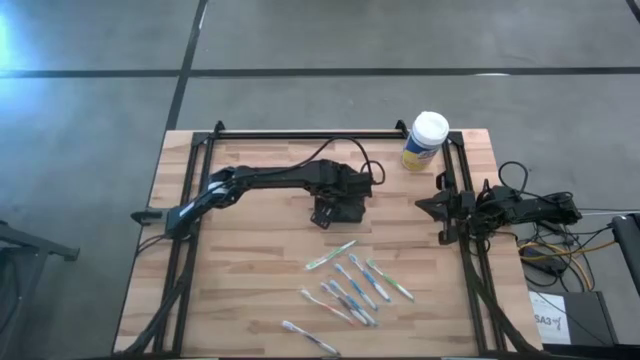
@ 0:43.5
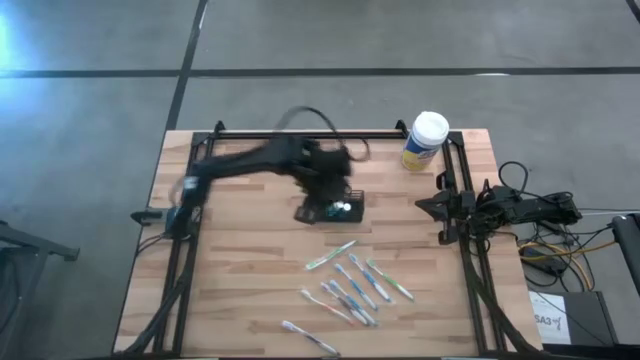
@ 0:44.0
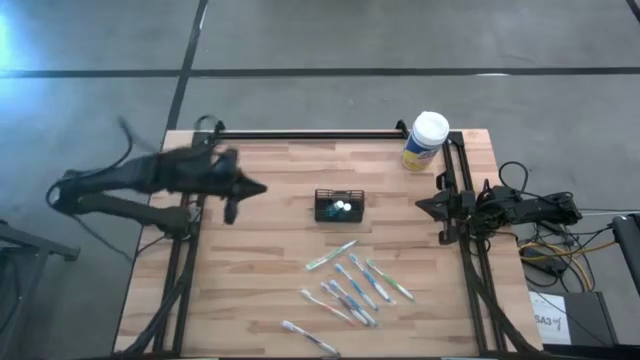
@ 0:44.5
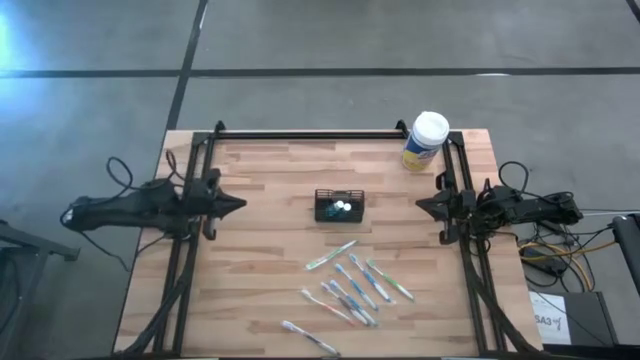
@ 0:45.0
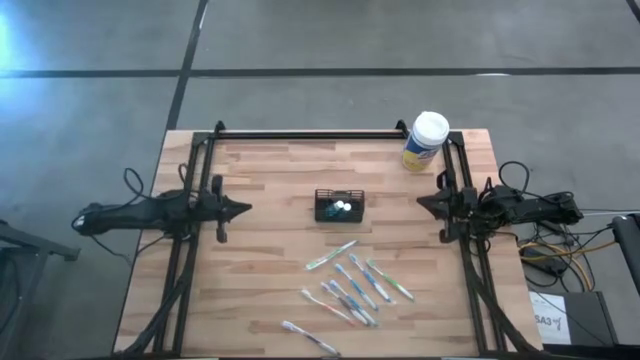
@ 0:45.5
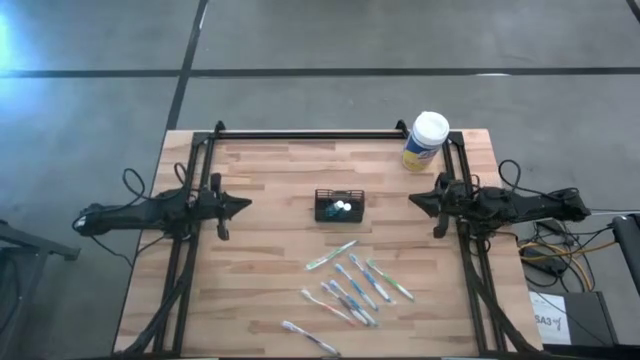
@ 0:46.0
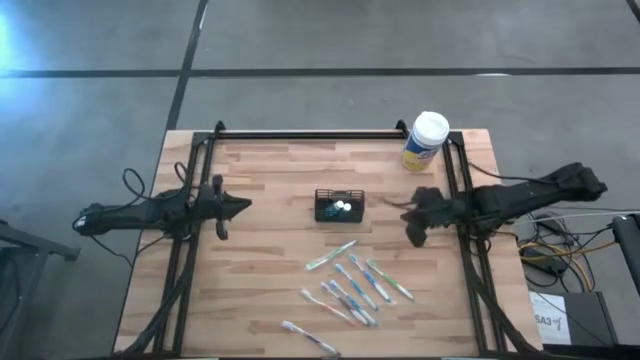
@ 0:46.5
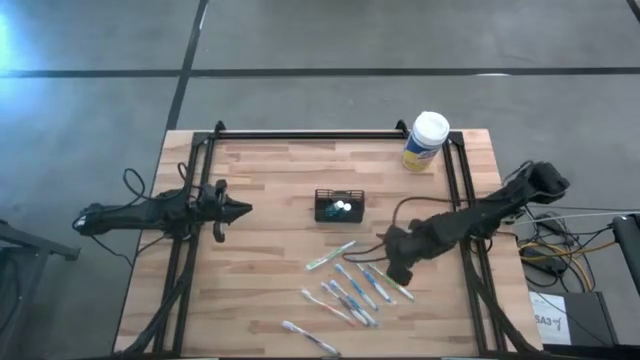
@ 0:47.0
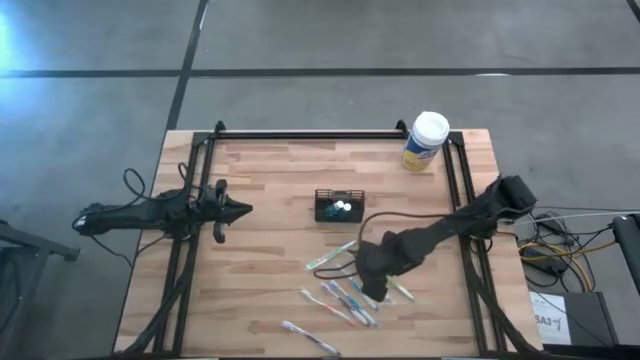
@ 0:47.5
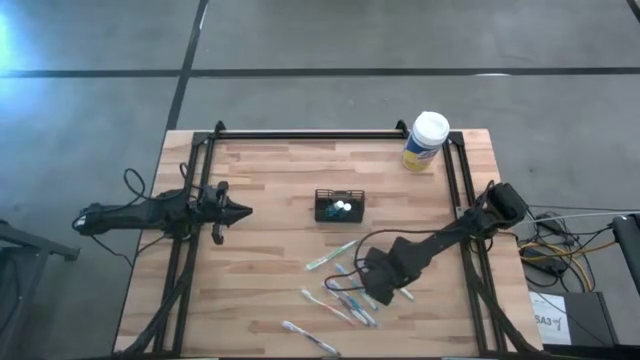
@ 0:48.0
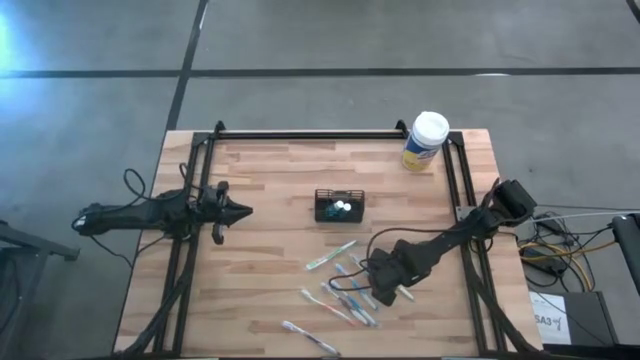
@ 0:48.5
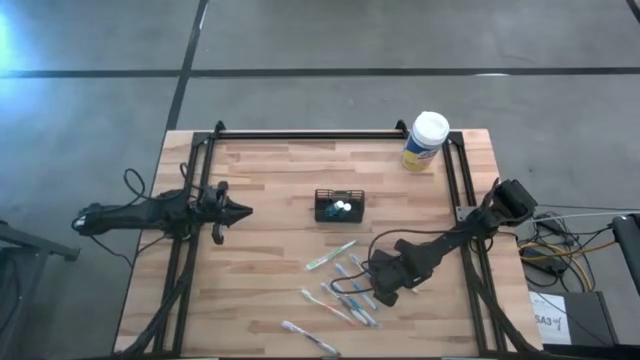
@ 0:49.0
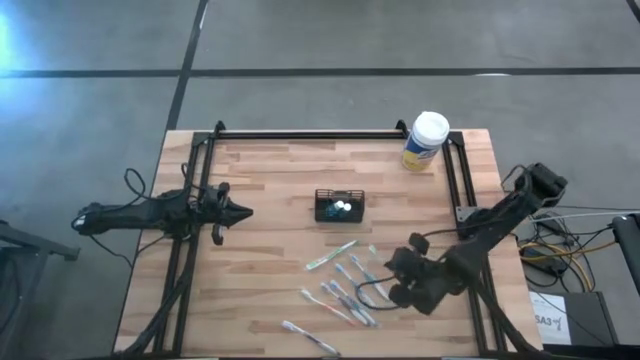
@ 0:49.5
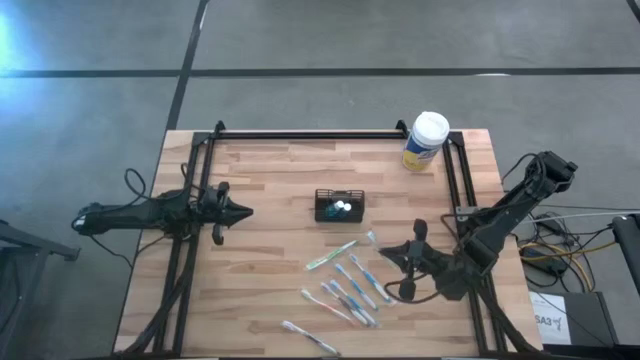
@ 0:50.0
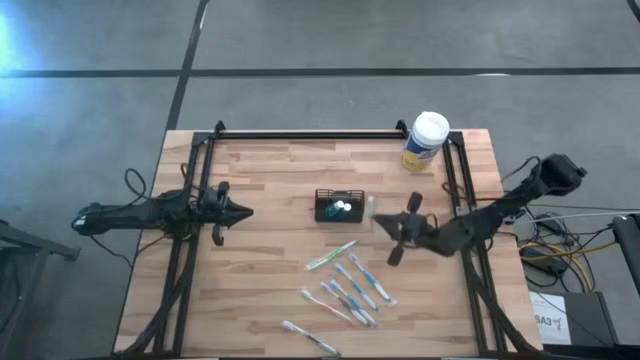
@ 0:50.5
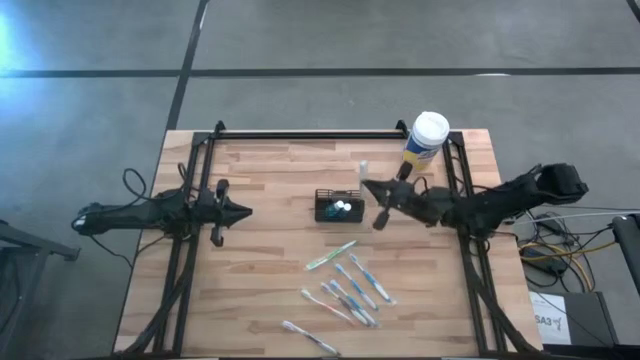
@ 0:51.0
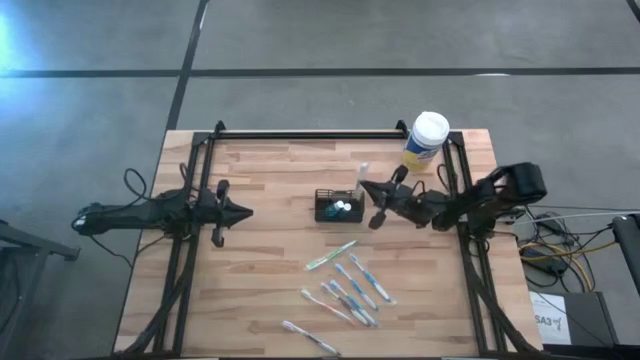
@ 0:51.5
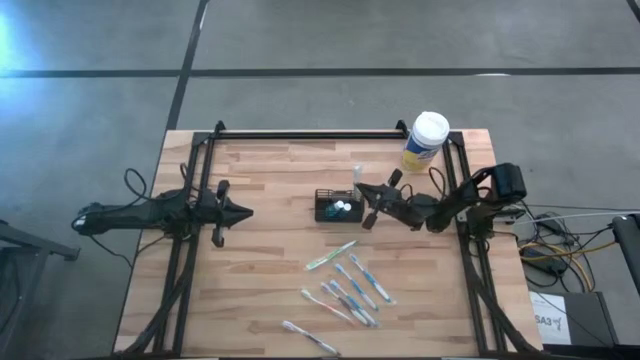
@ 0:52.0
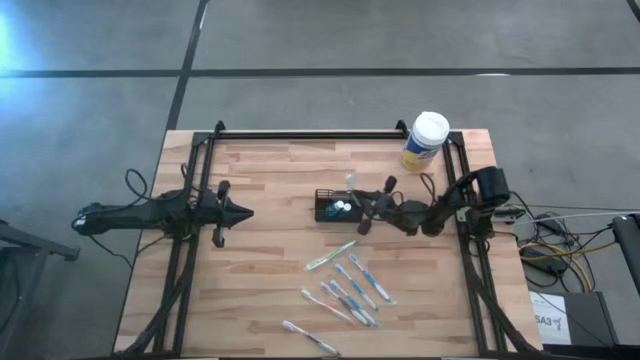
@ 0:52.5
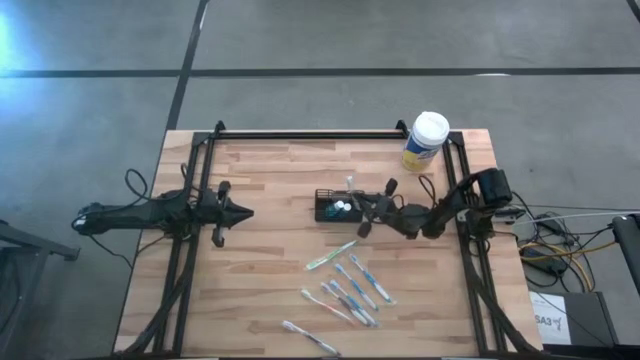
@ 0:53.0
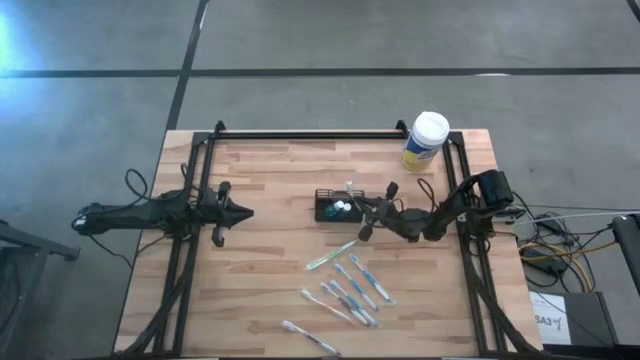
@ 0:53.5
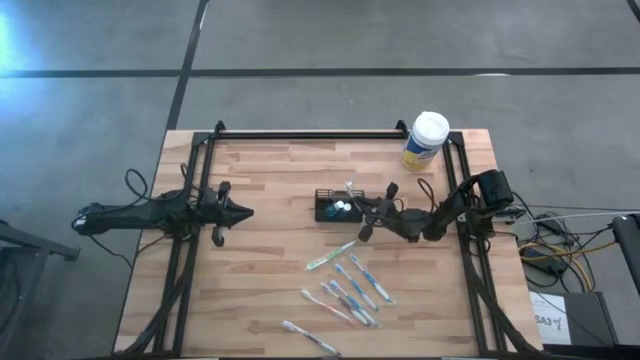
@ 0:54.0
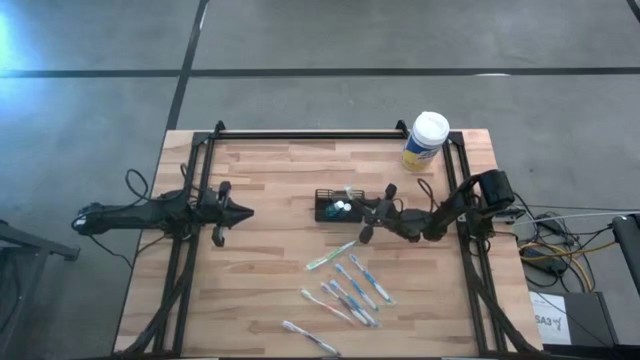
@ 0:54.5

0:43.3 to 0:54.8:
Task: Pick & Place toothbrushing station
Put the right green toothbrush into the black wire organizer

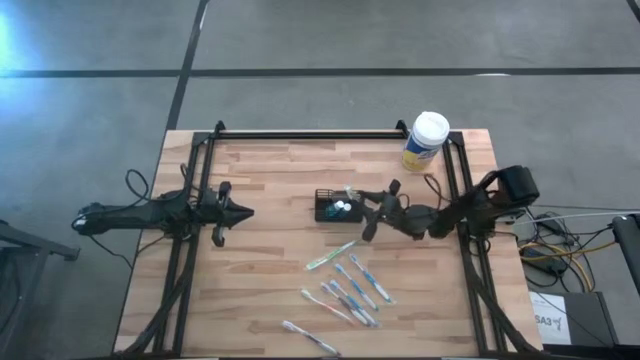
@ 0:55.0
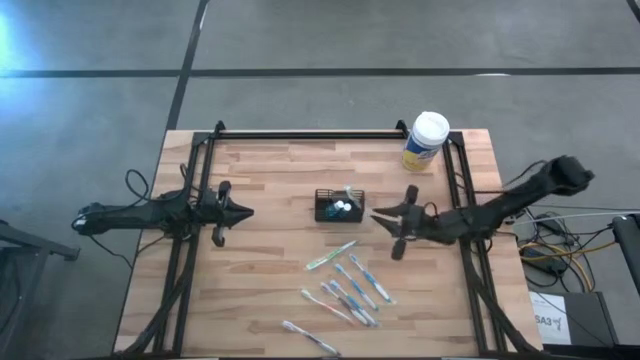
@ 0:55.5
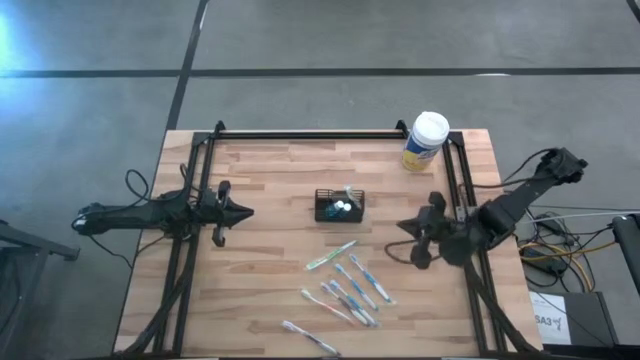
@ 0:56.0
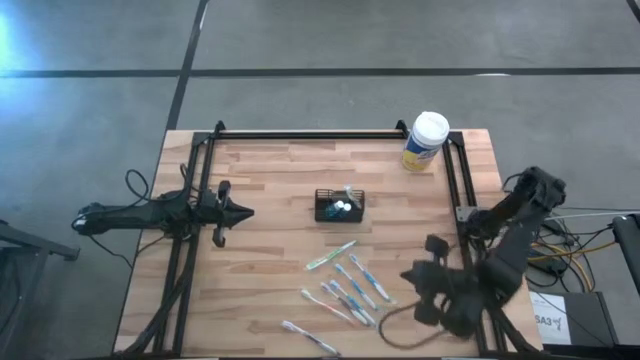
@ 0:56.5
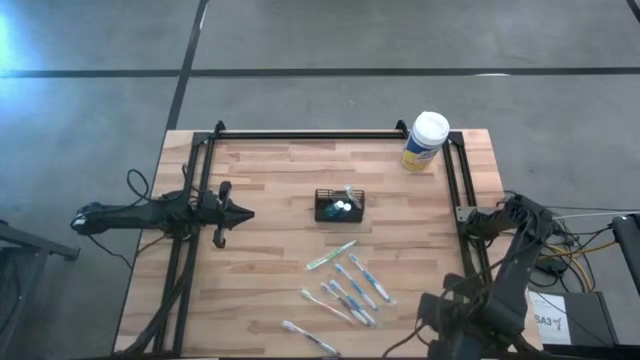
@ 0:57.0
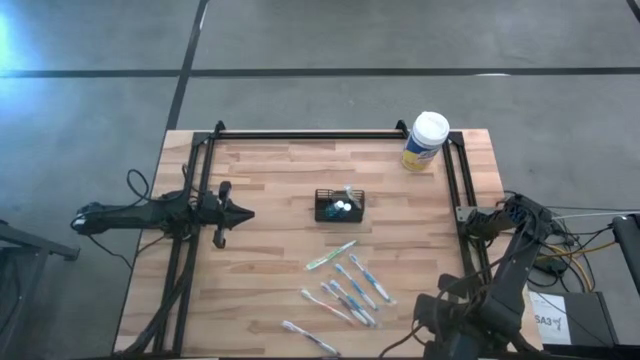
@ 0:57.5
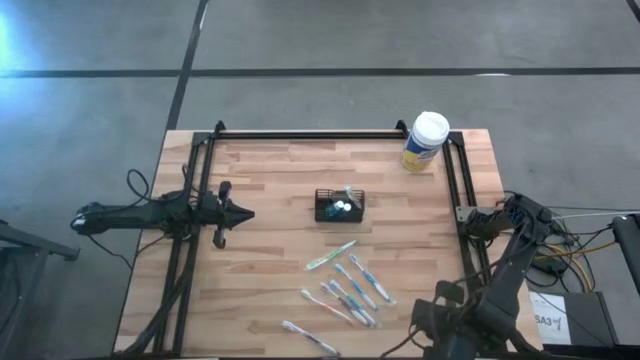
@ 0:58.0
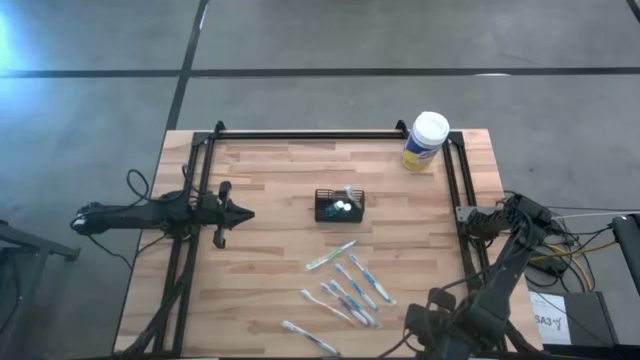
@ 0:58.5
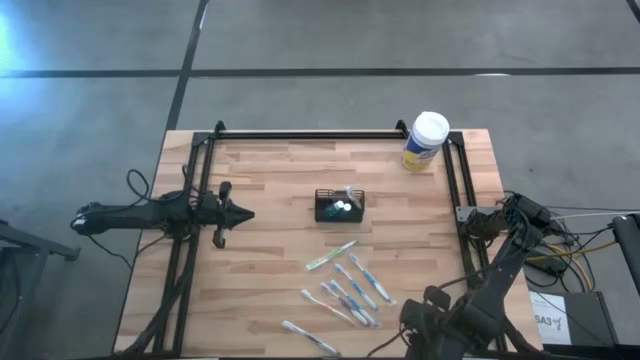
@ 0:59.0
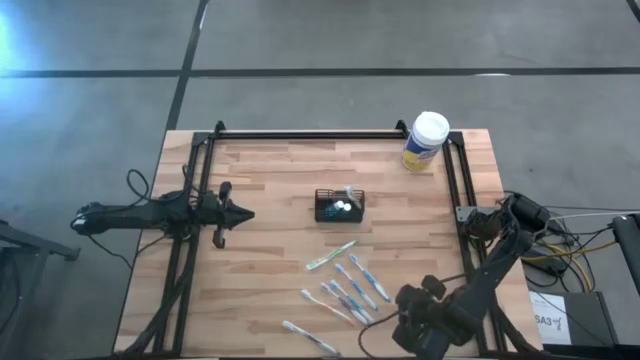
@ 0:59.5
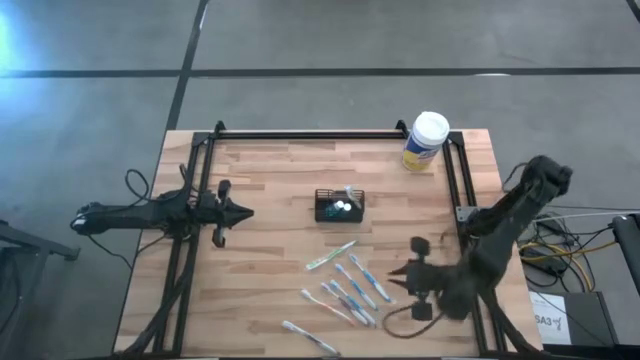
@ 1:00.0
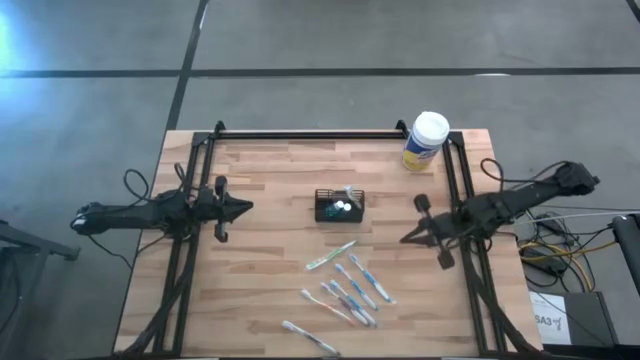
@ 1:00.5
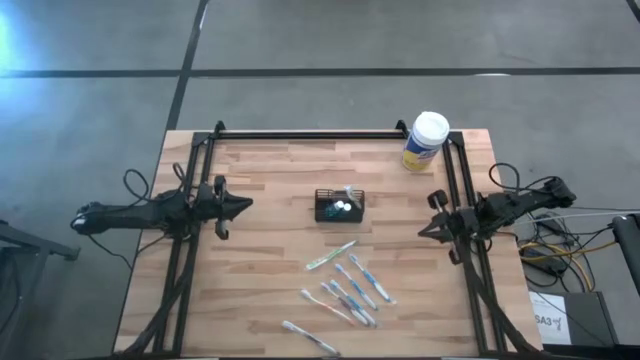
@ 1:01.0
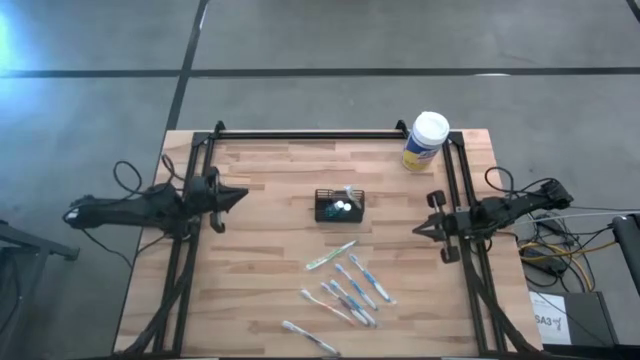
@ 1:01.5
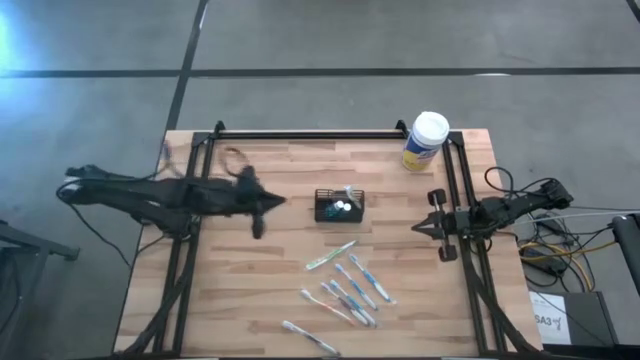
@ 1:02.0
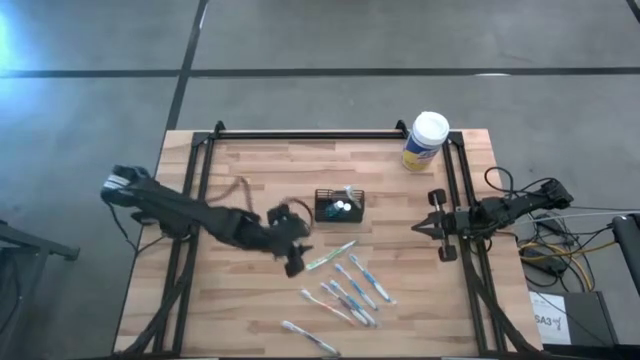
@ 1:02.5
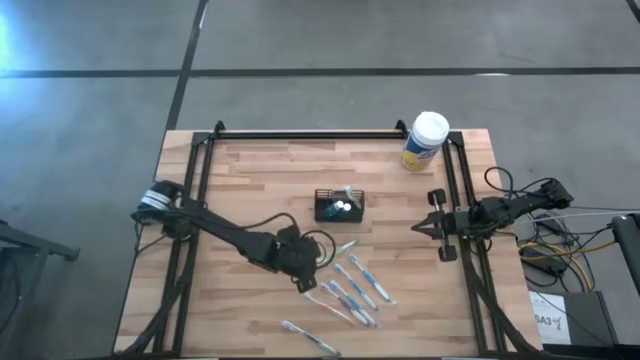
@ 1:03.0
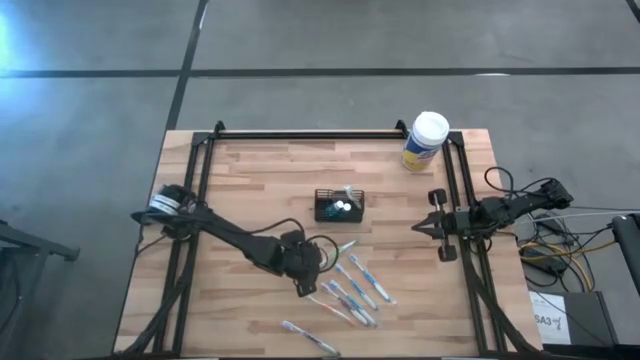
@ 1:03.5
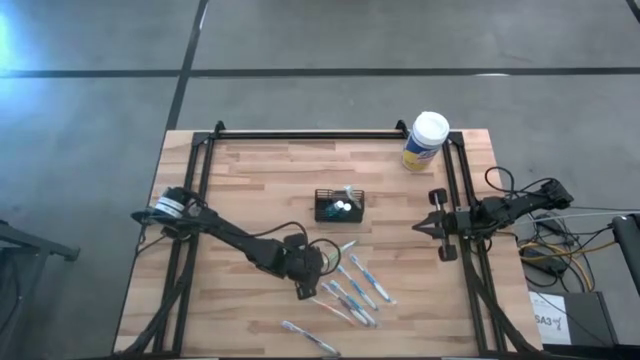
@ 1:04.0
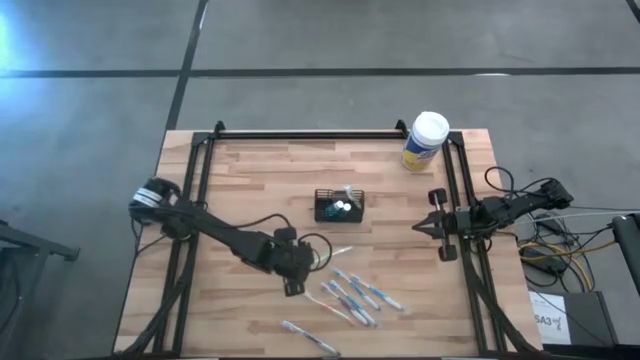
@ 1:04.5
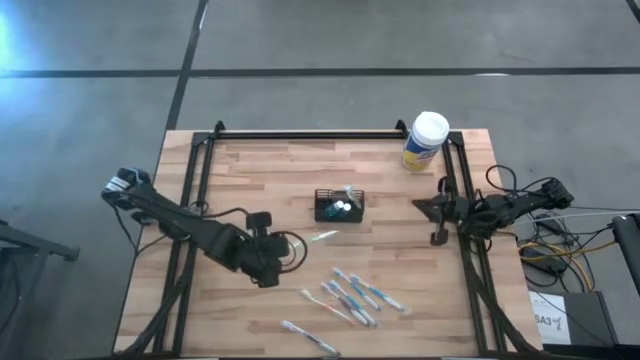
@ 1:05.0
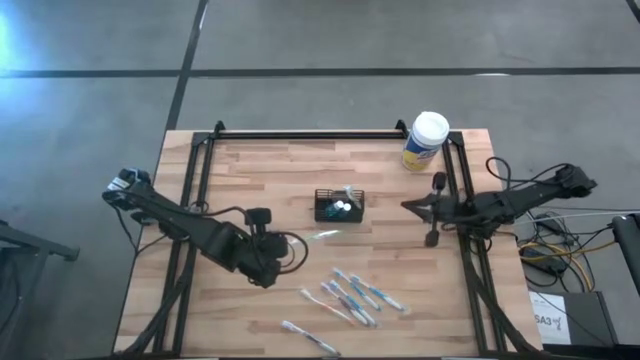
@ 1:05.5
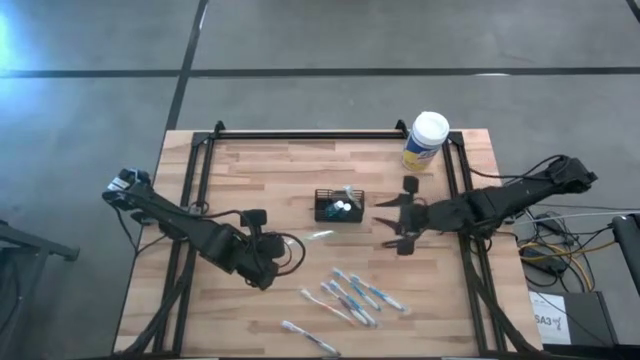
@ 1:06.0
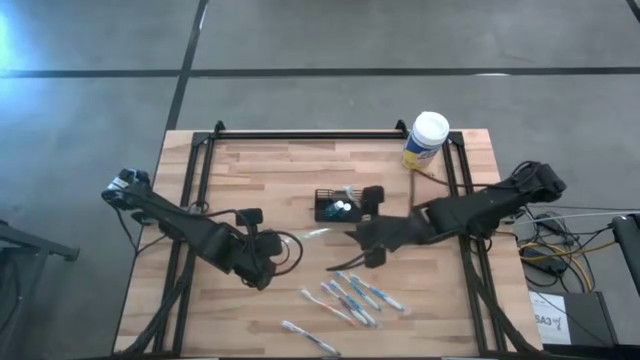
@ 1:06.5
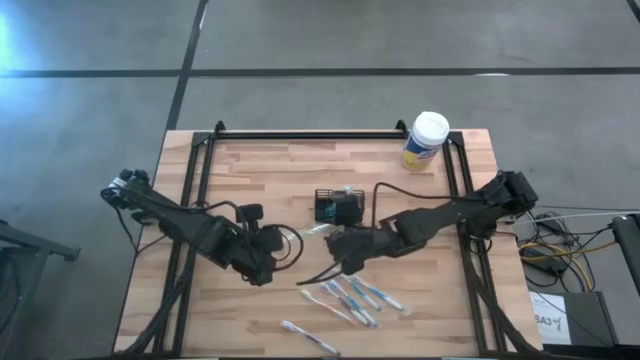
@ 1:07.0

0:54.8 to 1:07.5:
Put the green toothbrush into the black wire organizer
